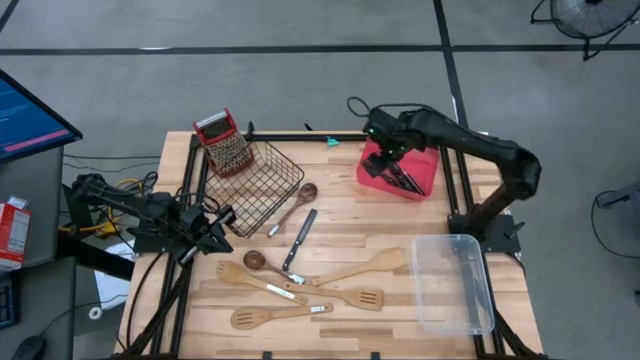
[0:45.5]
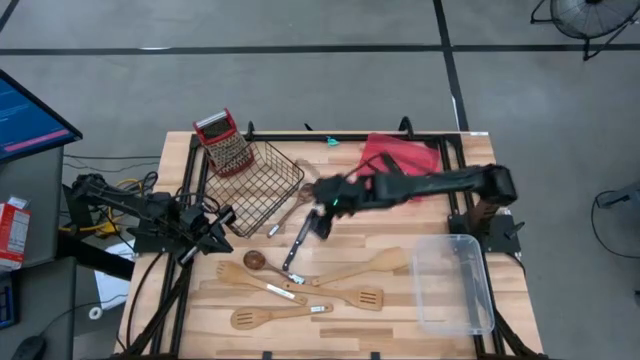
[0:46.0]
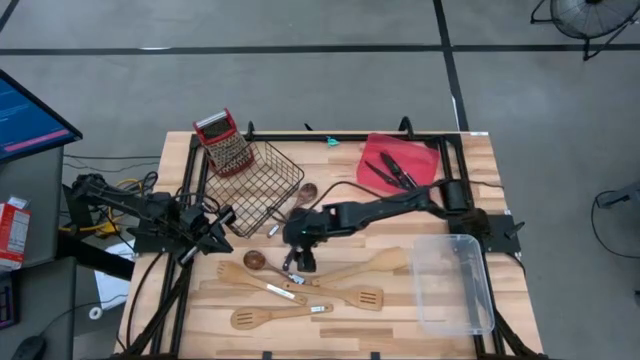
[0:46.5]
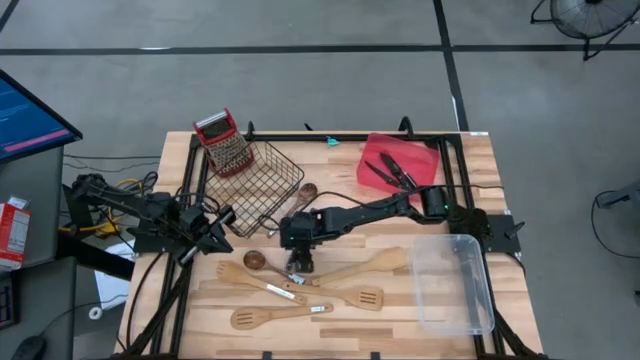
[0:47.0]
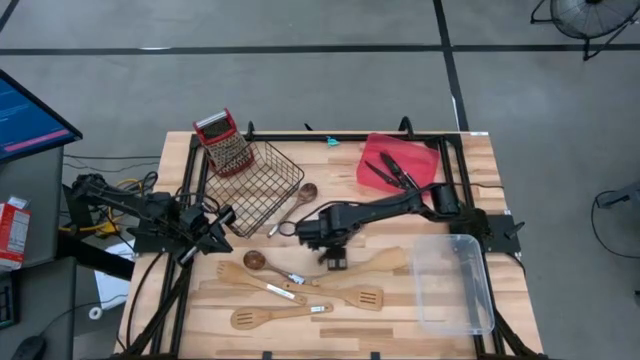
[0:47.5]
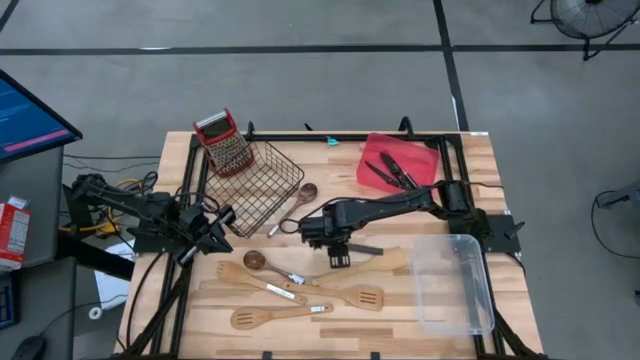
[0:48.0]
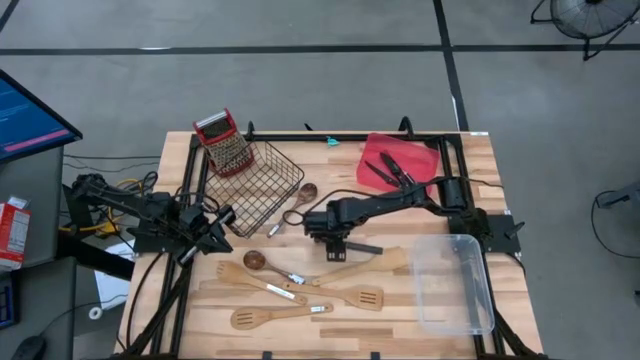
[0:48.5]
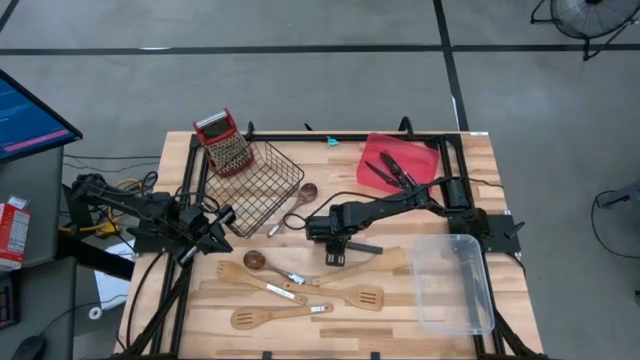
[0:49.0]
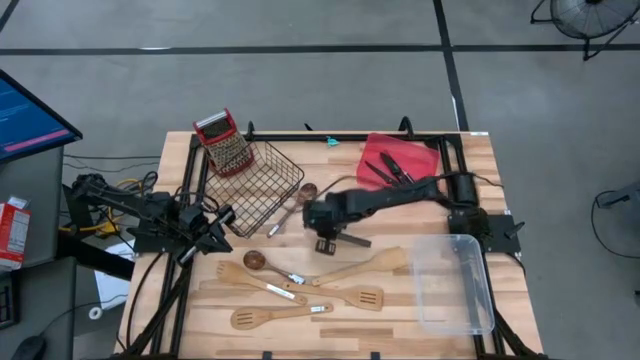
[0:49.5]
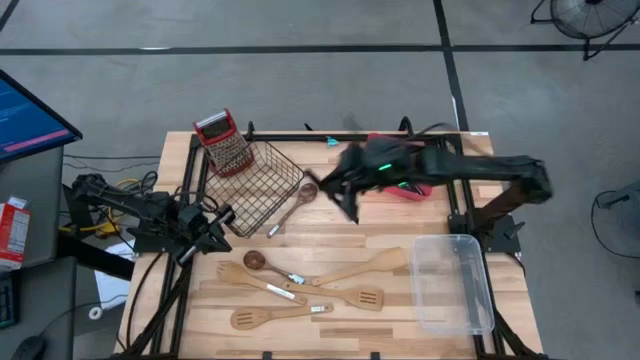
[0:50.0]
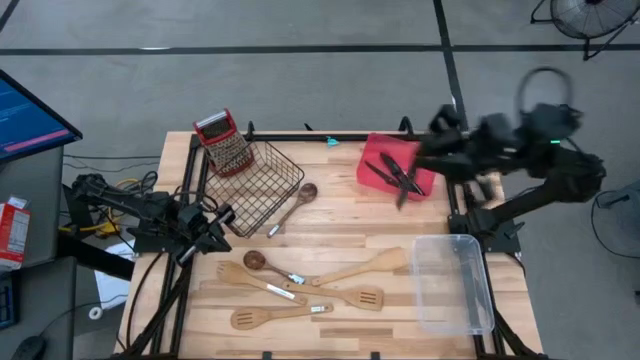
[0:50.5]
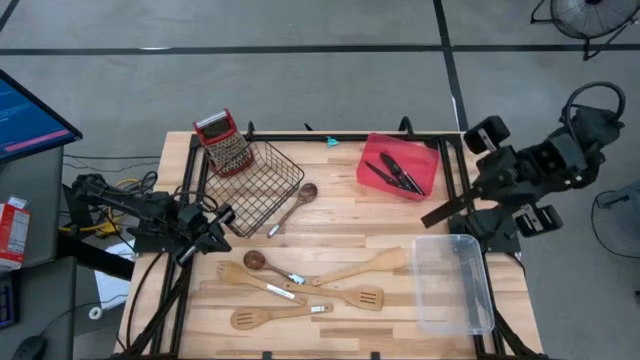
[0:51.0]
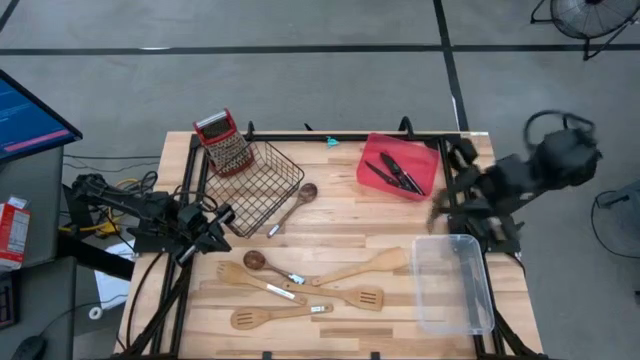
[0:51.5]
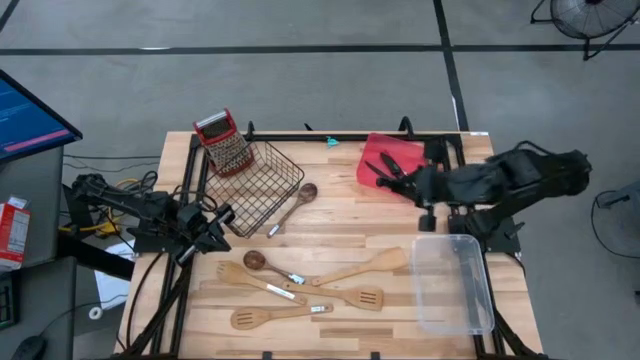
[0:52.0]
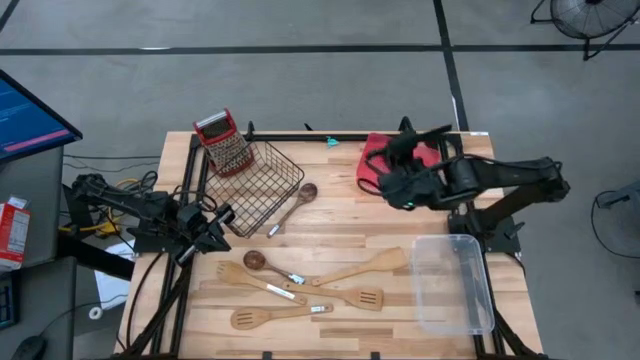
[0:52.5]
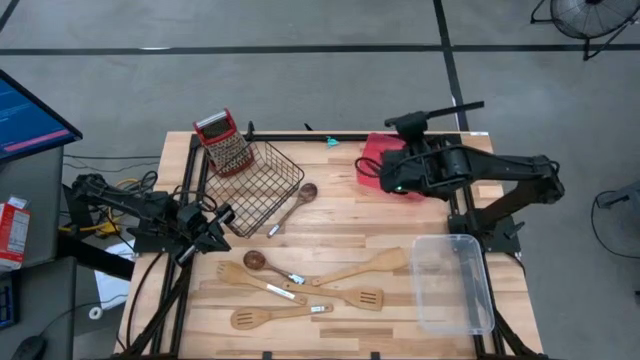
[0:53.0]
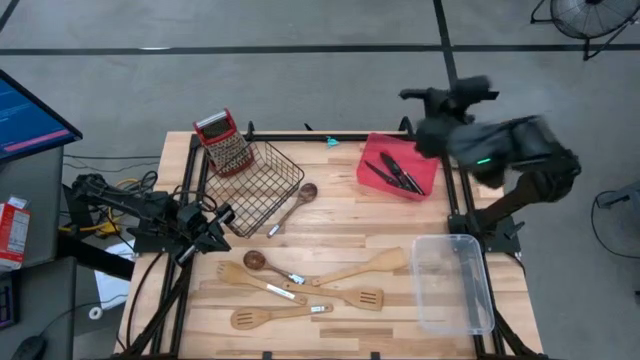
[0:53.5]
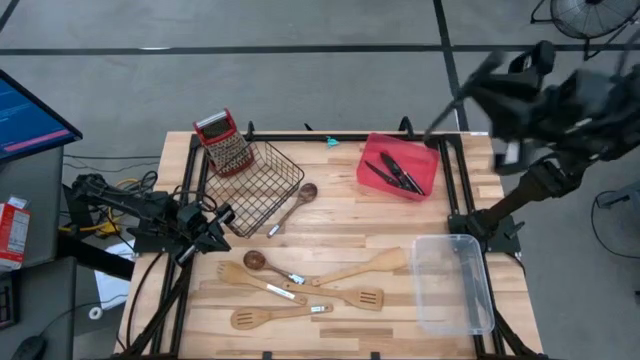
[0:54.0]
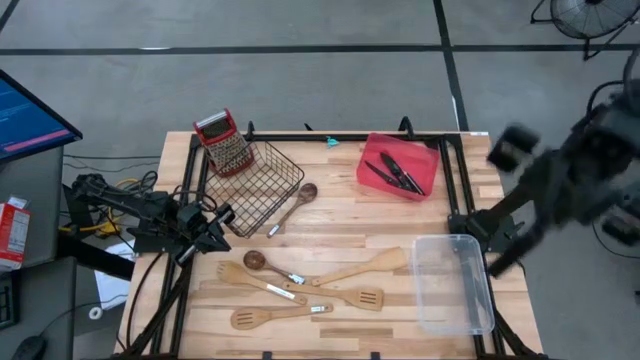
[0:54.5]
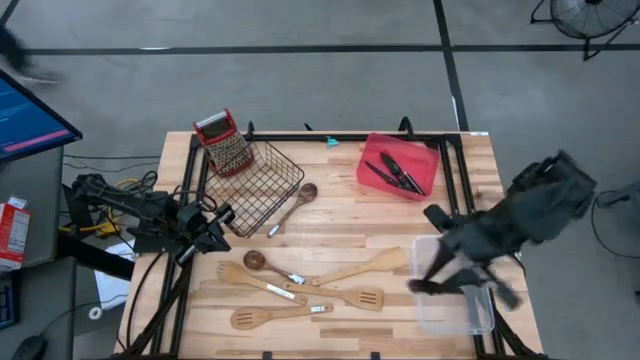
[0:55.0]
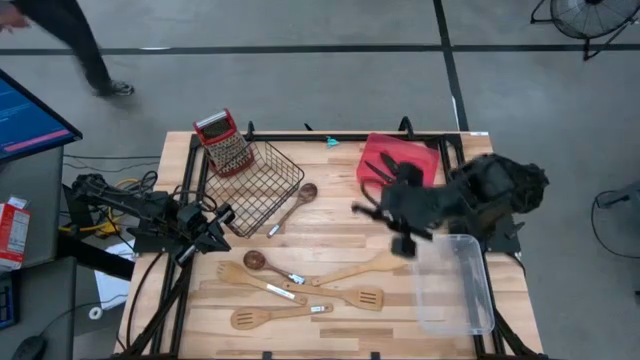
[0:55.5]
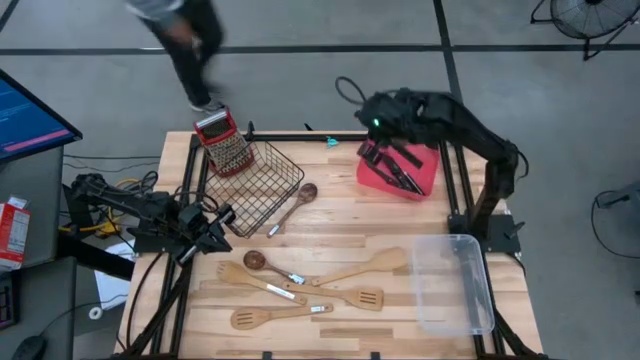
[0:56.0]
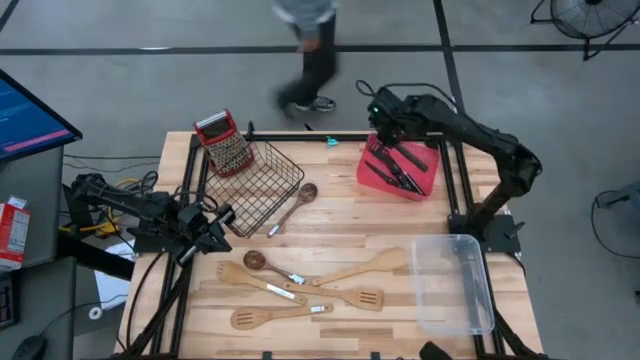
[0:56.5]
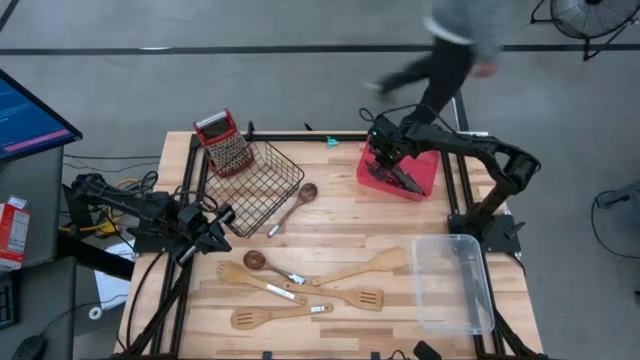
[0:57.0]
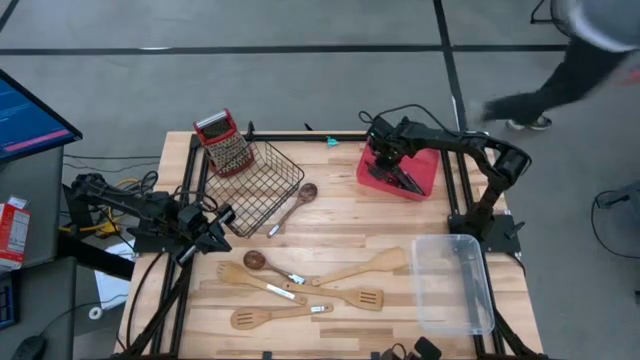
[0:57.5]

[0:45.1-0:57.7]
Task: Pick & Place Kitchen Items
Put the black knife into the red bin

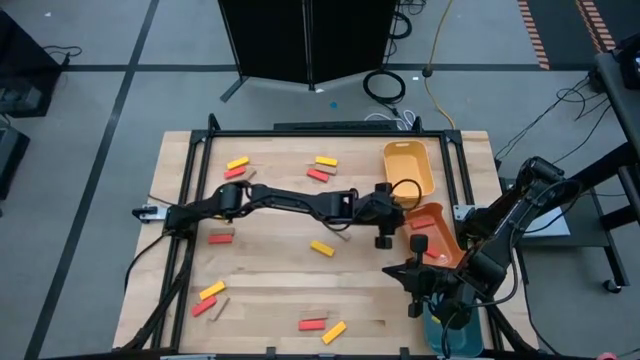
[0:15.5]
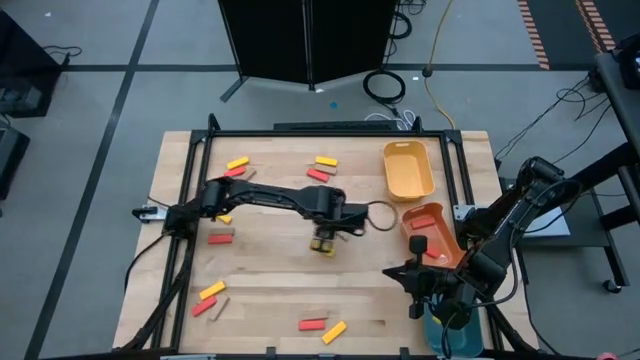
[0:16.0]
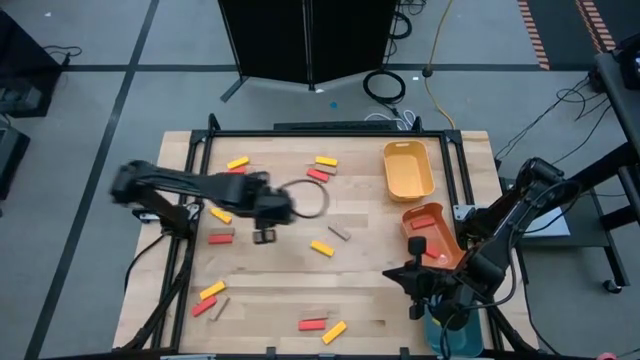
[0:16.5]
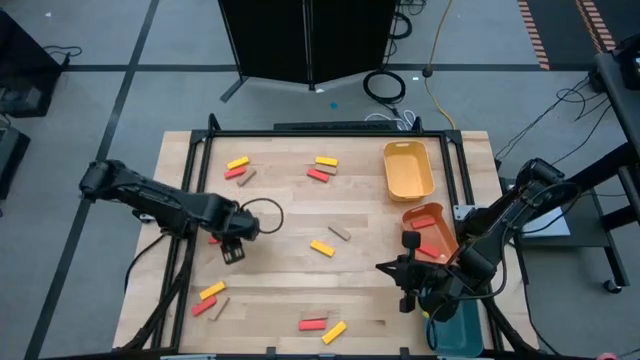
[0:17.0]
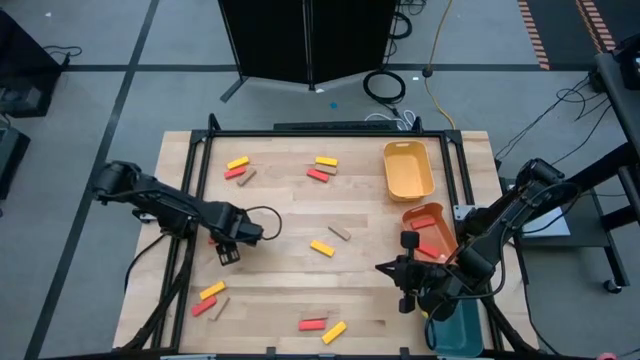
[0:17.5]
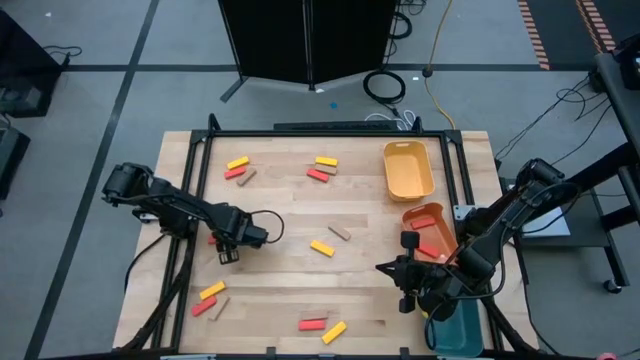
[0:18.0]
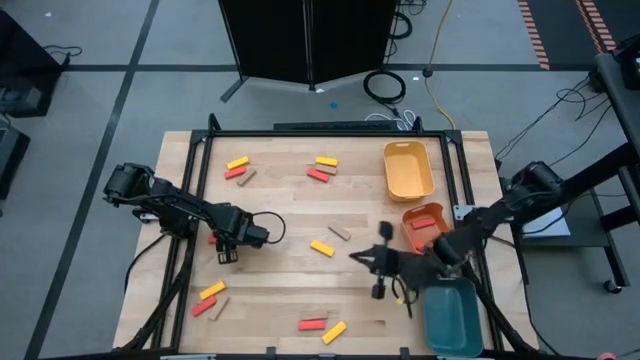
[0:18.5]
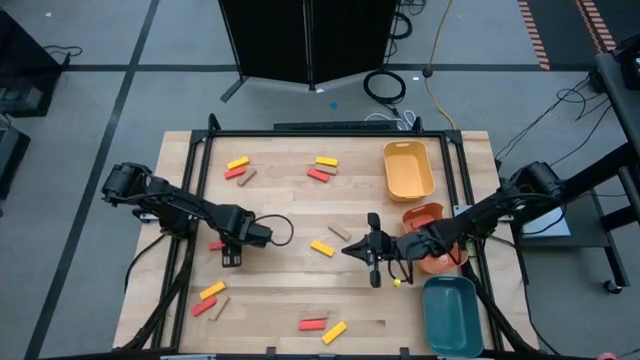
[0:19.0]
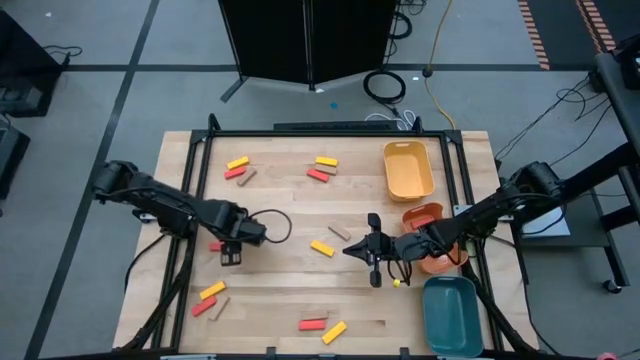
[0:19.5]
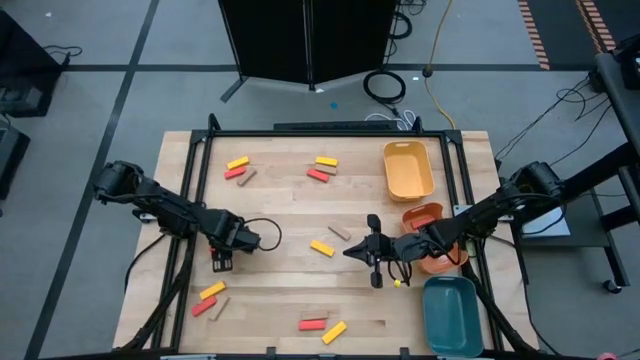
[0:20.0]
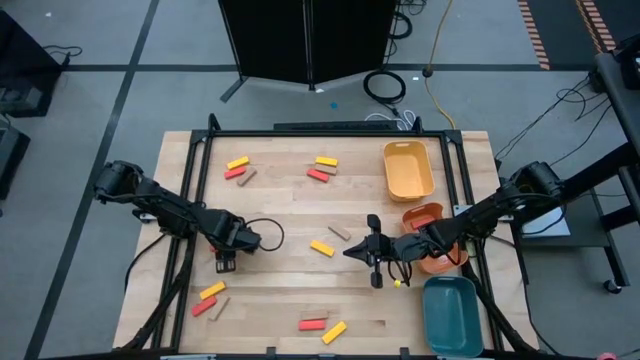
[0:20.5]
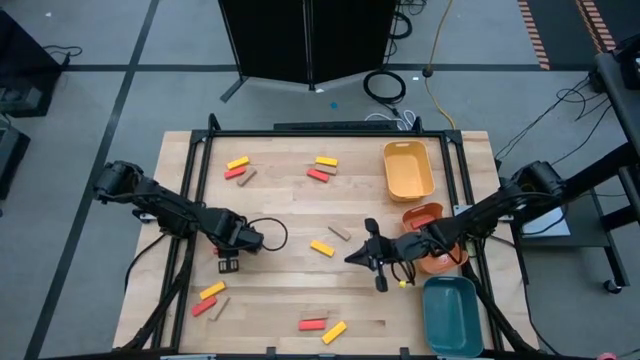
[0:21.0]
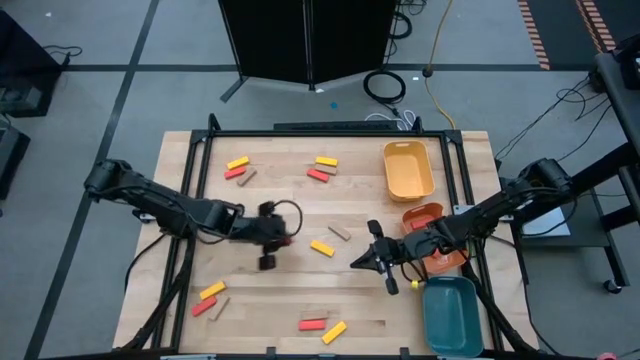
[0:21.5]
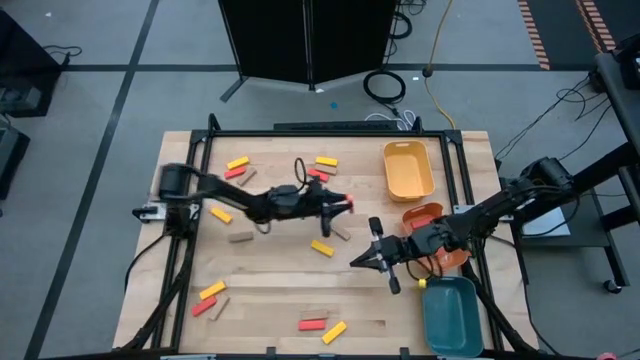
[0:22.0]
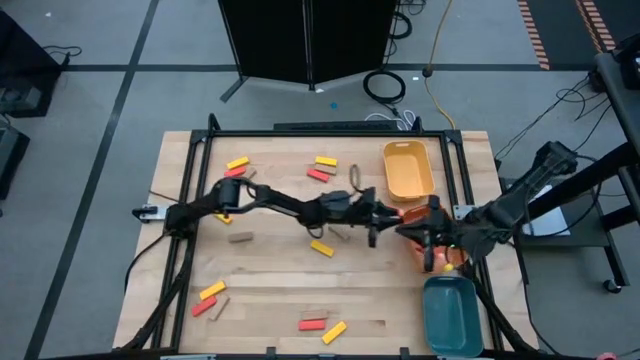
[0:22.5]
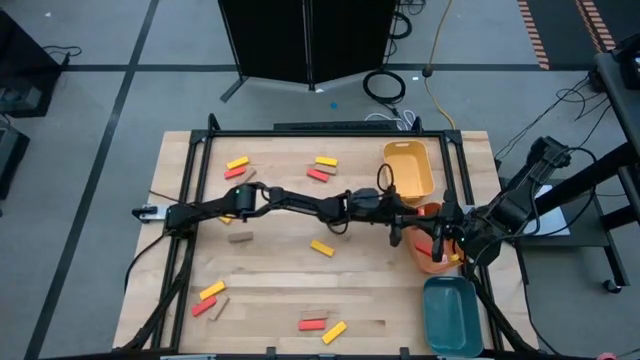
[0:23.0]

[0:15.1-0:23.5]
Task: Sort blocks
Put the red block into the orange bin
